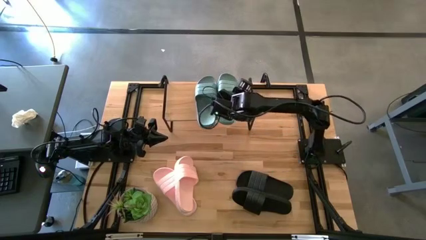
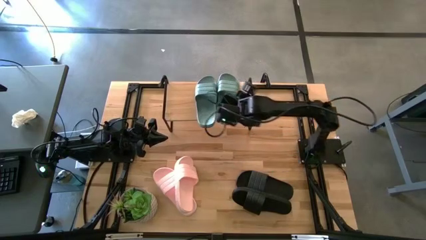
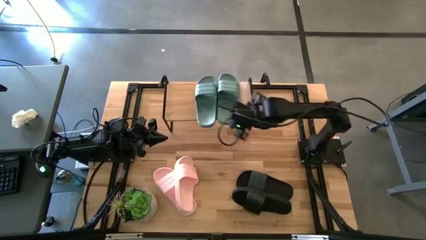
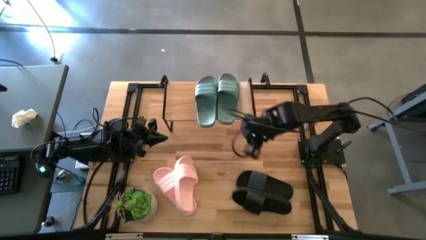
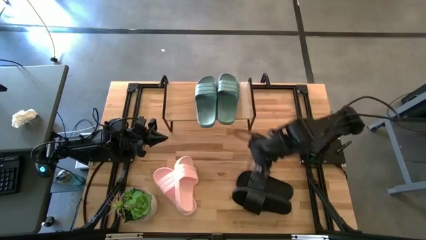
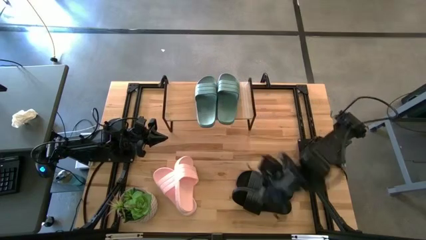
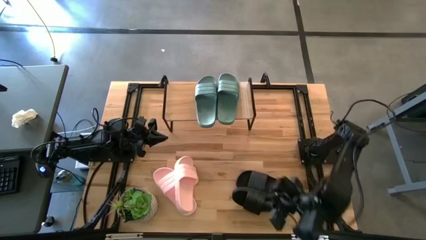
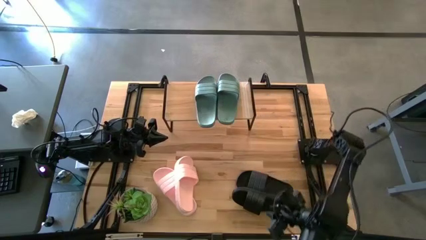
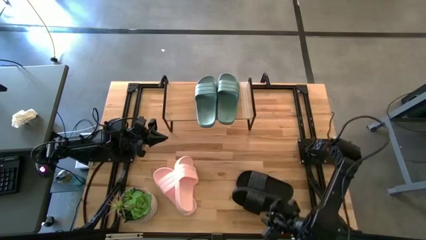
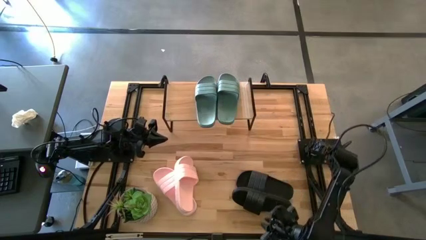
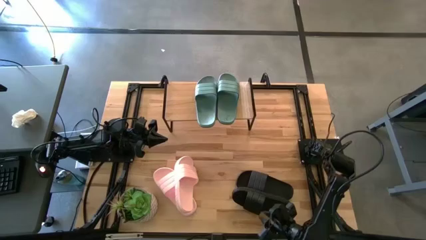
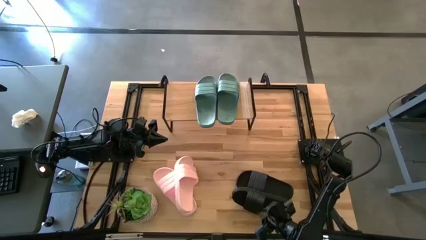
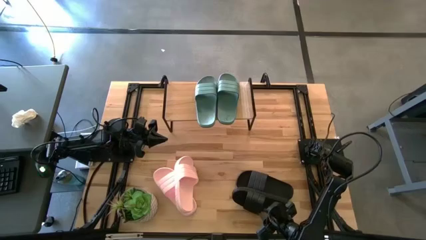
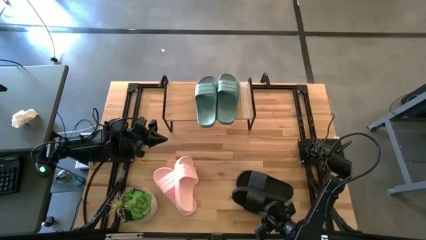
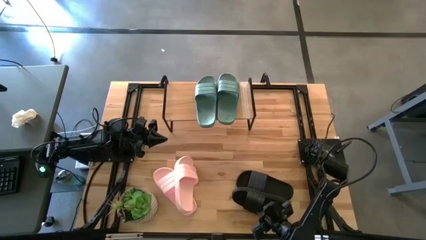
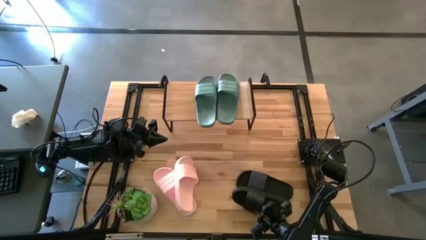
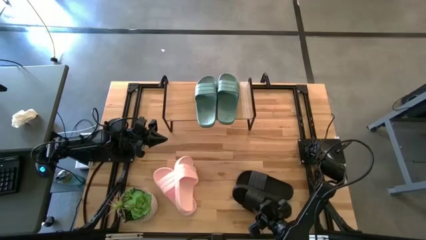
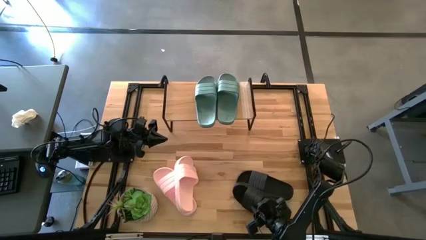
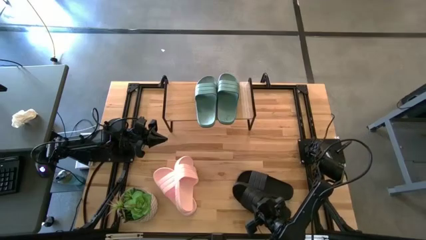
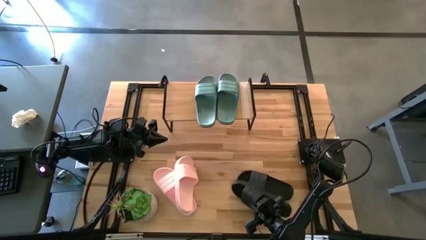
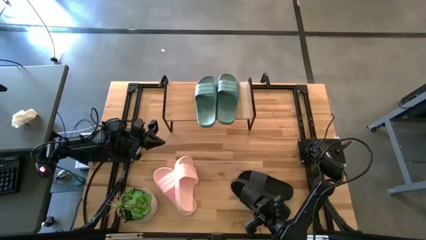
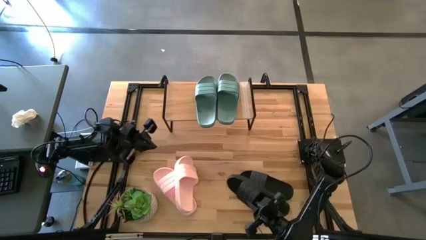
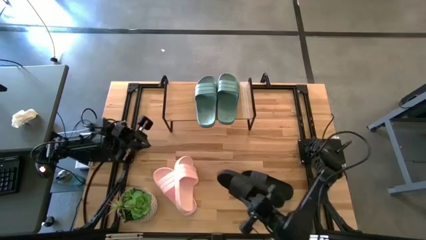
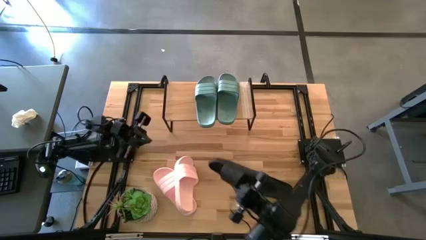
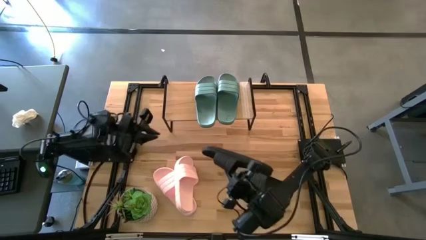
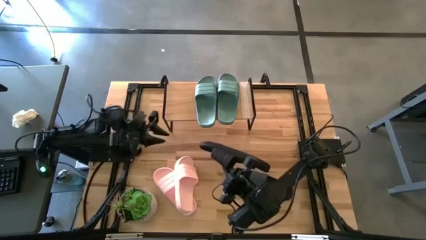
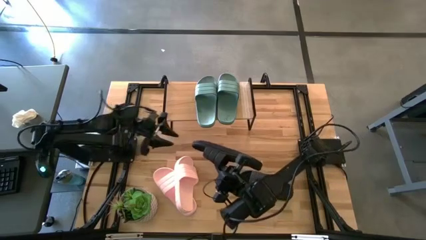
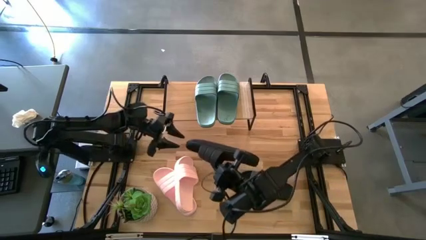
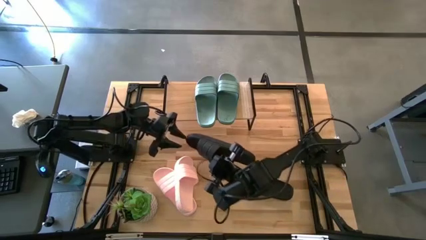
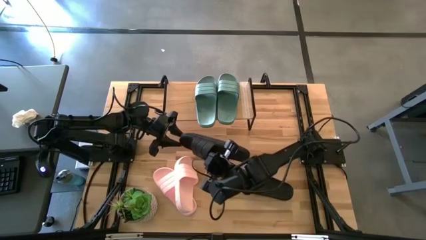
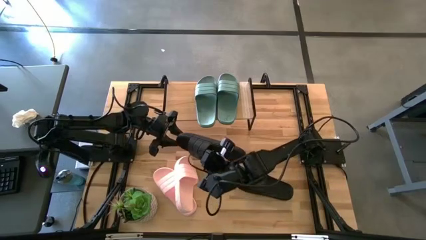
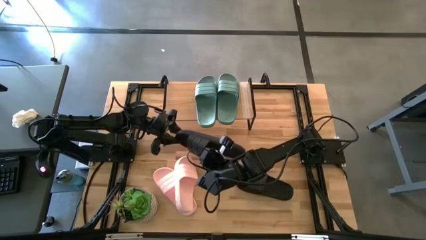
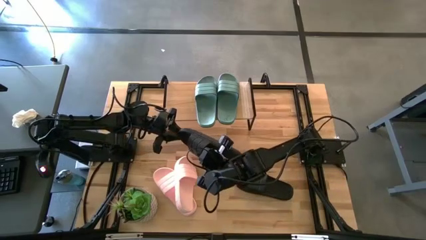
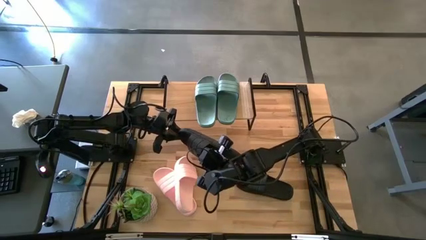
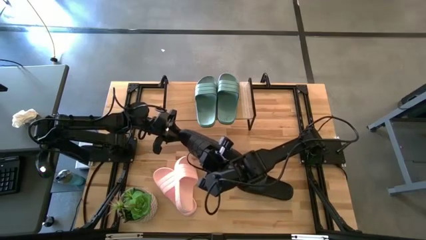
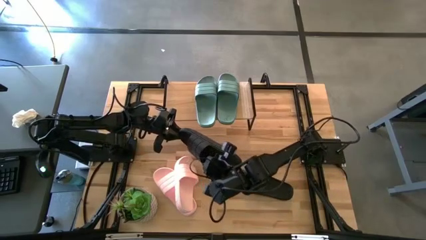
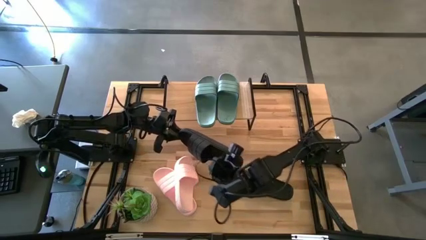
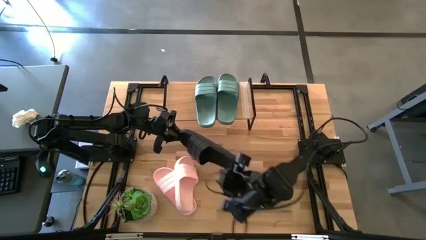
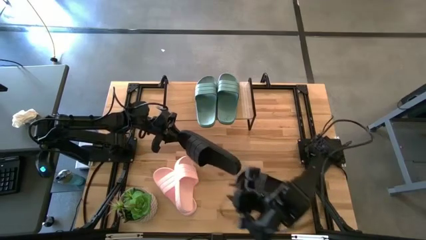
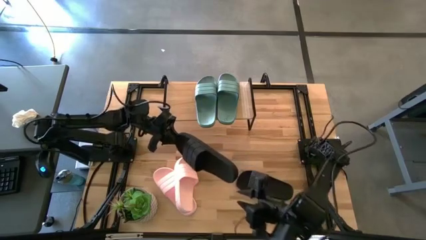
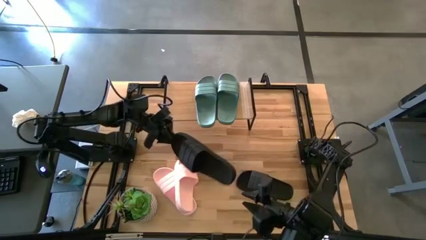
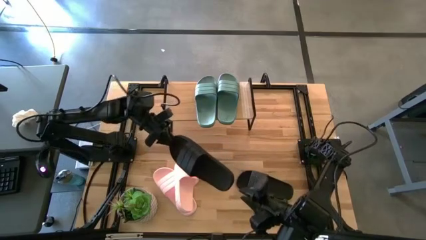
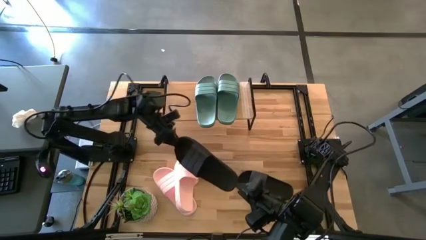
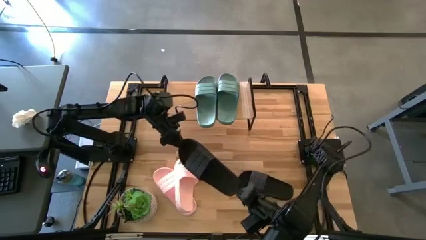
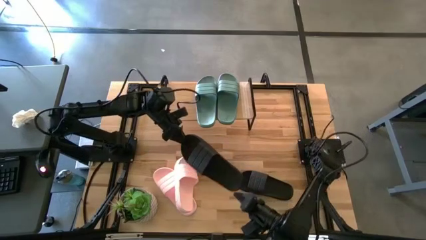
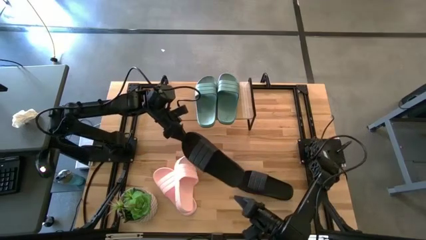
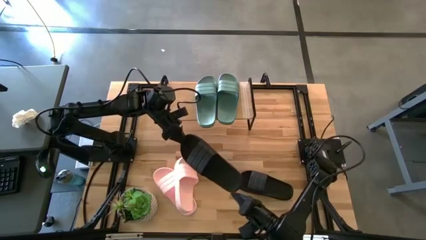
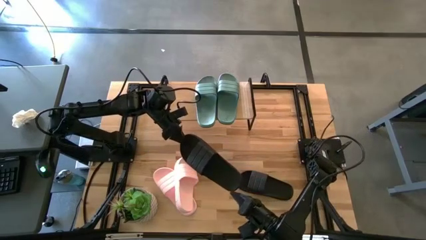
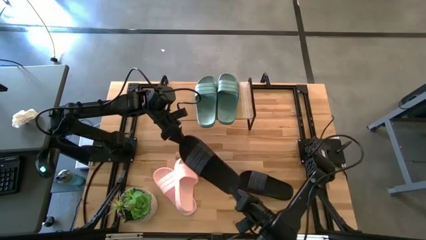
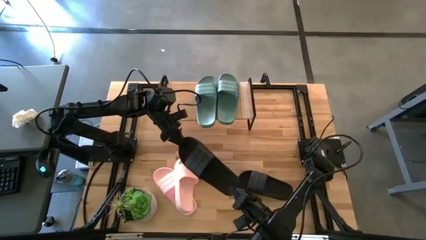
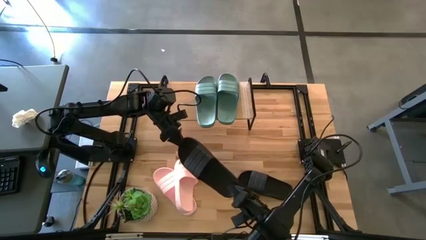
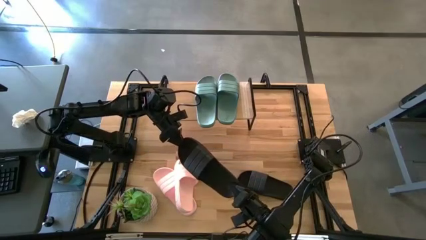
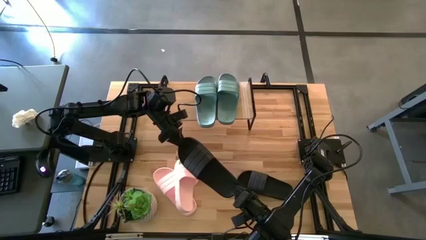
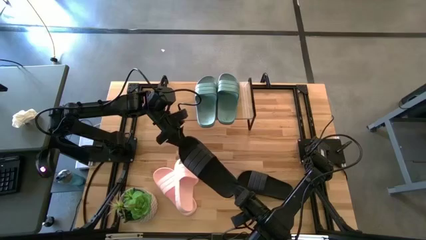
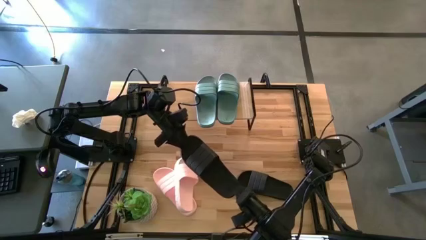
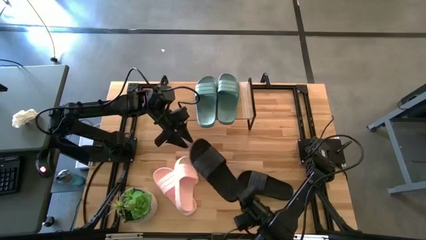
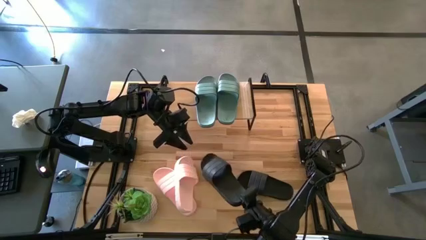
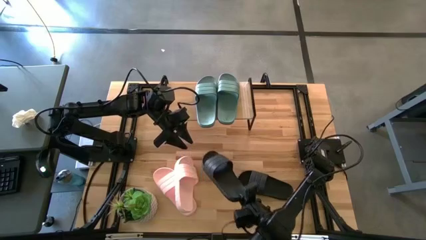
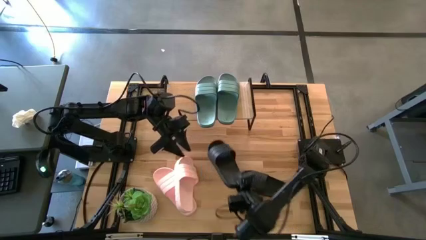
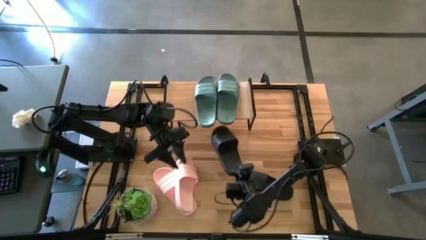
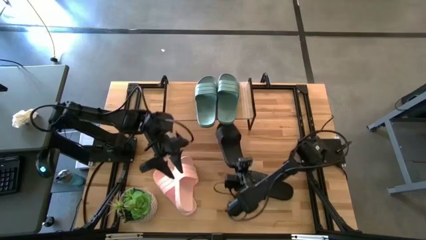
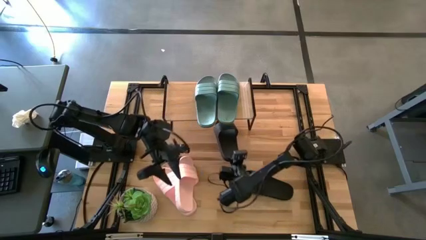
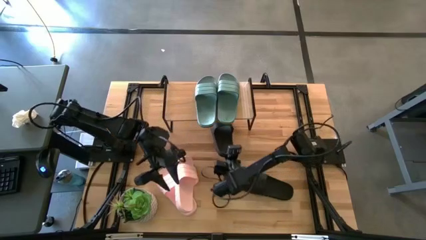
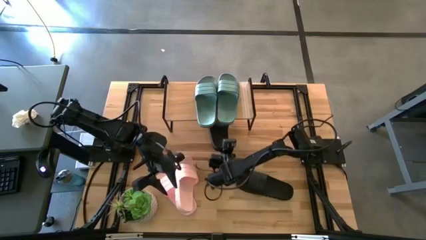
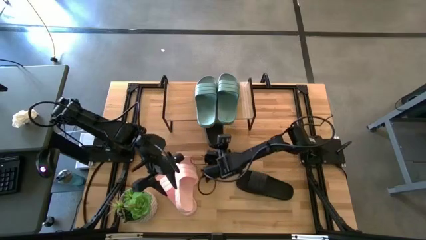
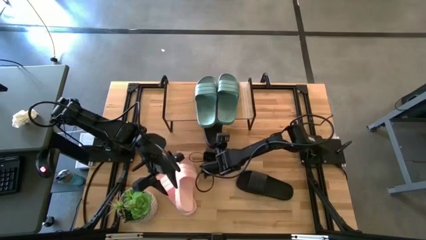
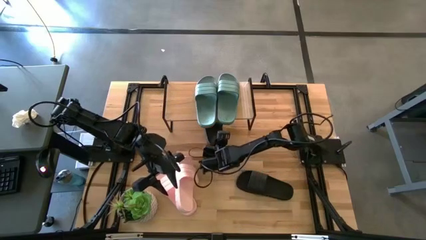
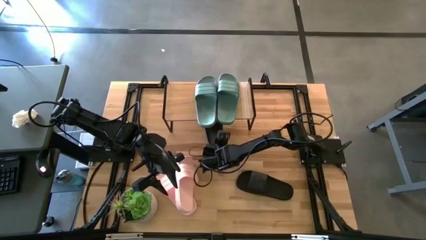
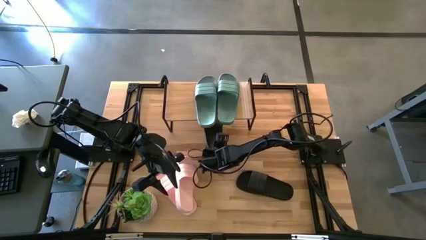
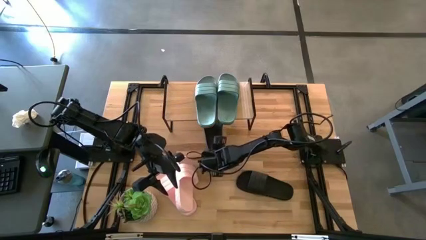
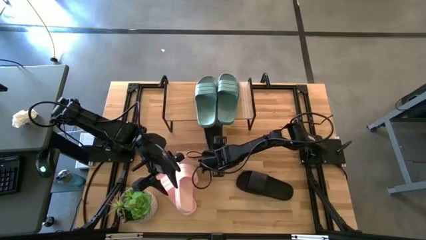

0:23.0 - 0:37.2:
Task: Pick and place slides into the shelf
Put the bottom black slipper under the shelf
